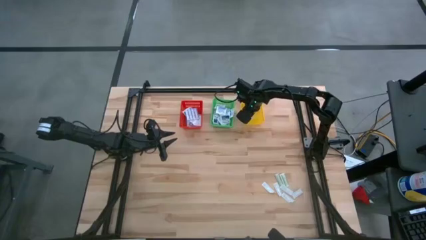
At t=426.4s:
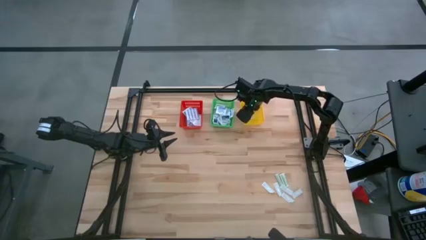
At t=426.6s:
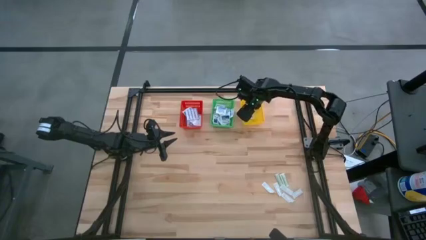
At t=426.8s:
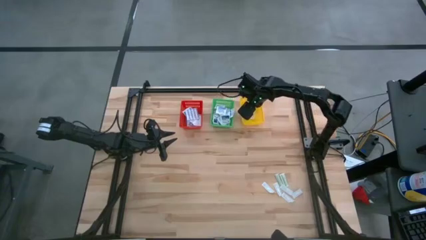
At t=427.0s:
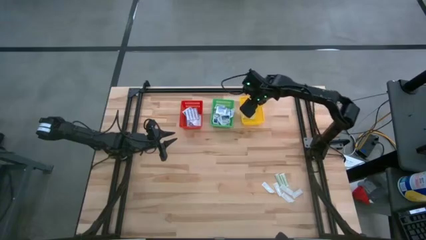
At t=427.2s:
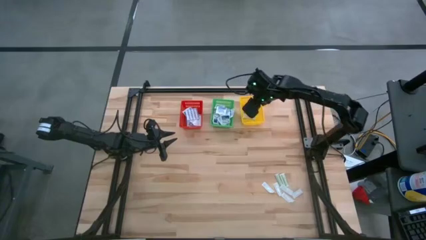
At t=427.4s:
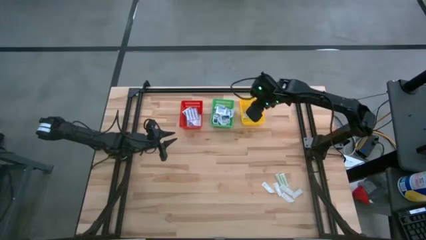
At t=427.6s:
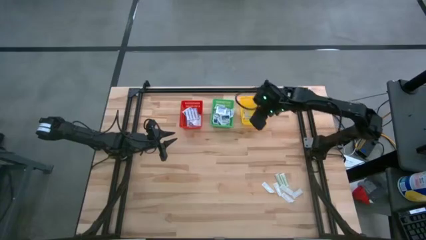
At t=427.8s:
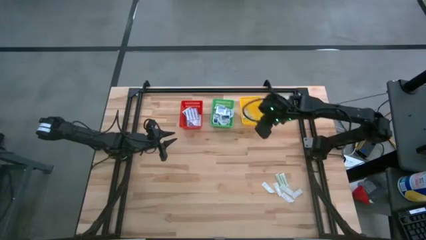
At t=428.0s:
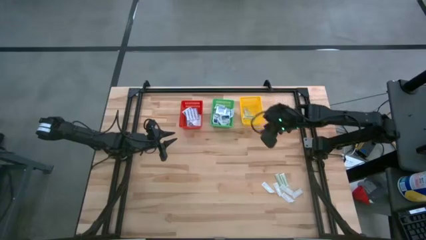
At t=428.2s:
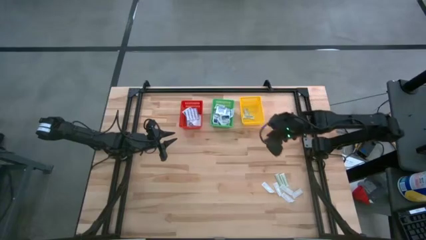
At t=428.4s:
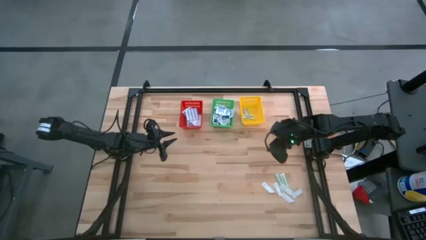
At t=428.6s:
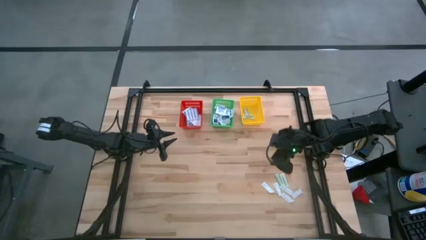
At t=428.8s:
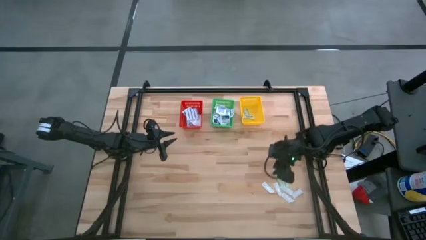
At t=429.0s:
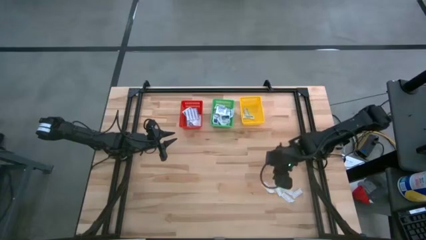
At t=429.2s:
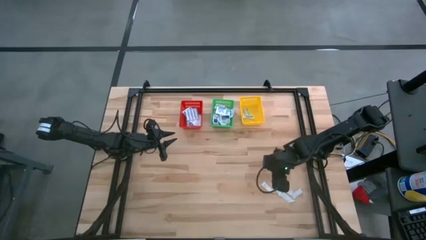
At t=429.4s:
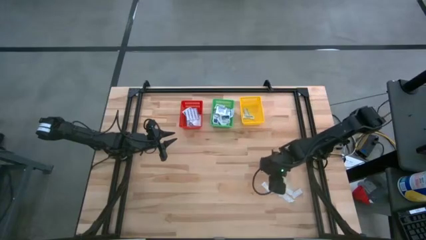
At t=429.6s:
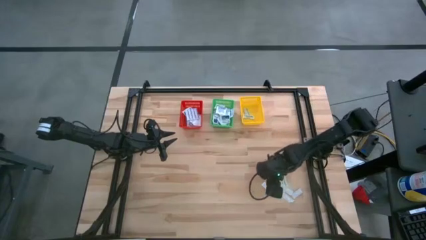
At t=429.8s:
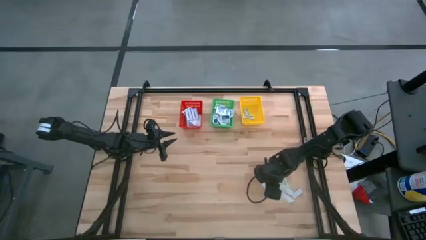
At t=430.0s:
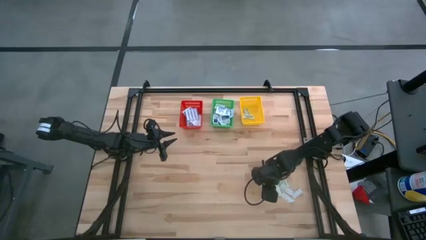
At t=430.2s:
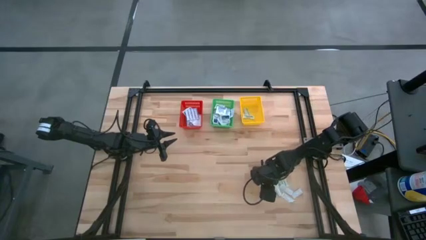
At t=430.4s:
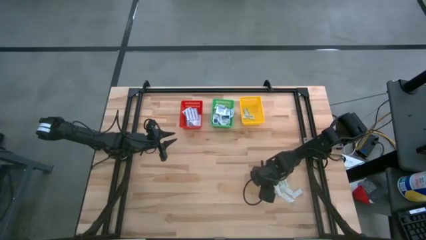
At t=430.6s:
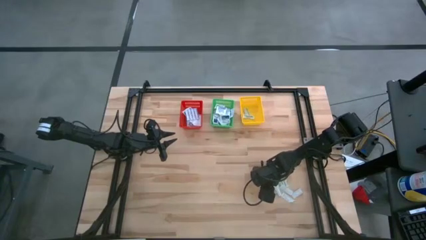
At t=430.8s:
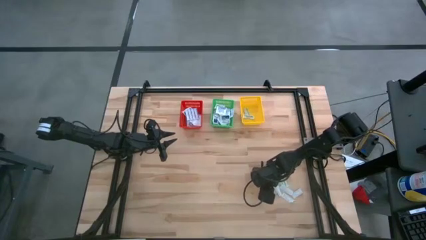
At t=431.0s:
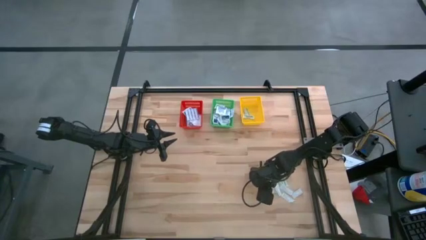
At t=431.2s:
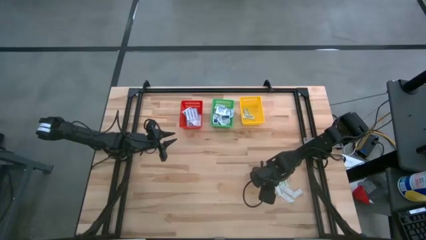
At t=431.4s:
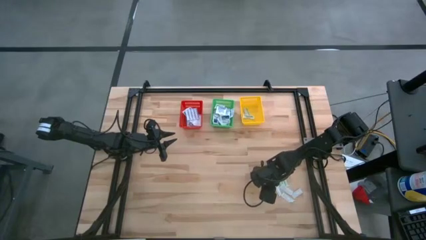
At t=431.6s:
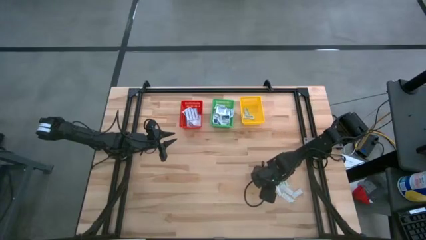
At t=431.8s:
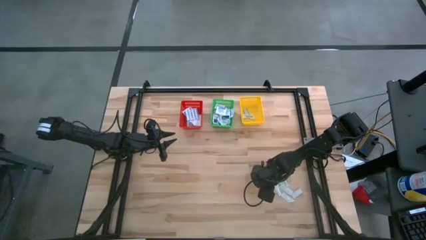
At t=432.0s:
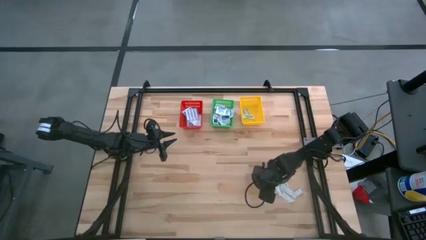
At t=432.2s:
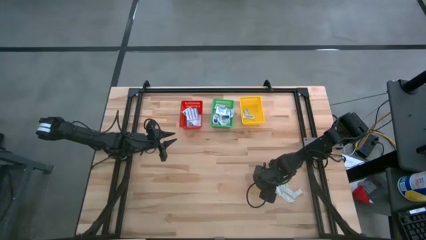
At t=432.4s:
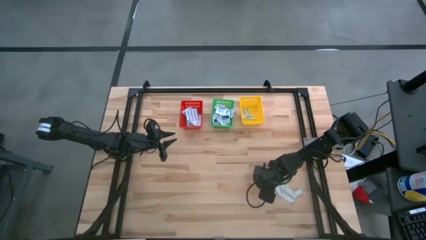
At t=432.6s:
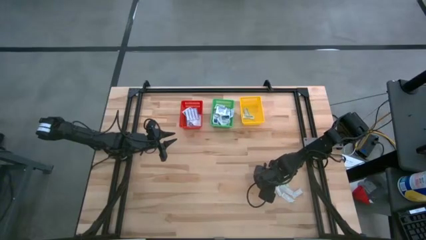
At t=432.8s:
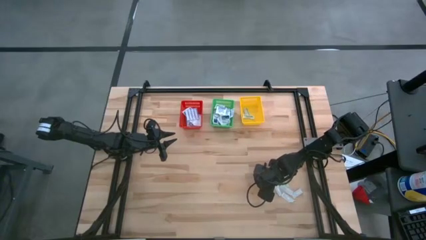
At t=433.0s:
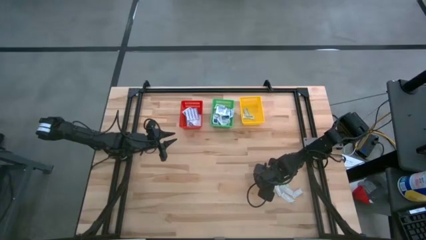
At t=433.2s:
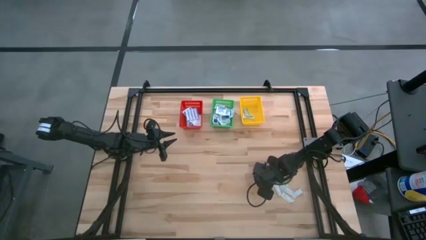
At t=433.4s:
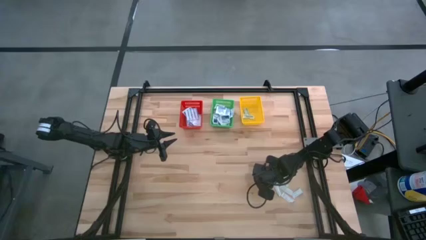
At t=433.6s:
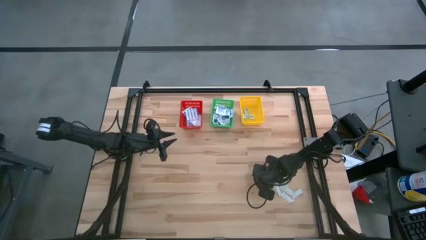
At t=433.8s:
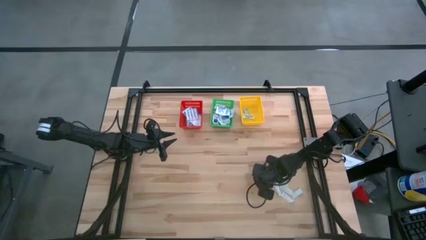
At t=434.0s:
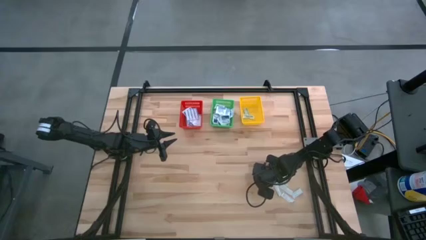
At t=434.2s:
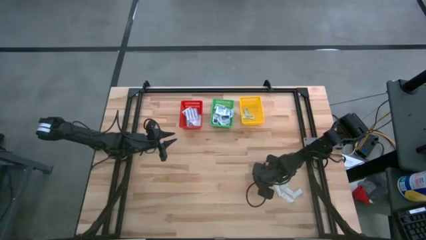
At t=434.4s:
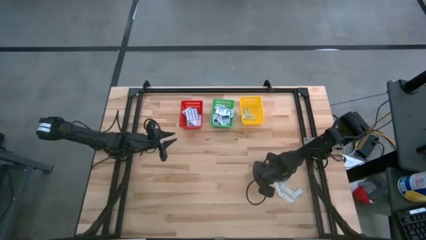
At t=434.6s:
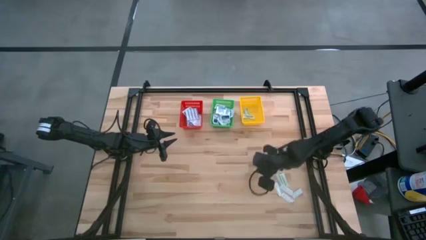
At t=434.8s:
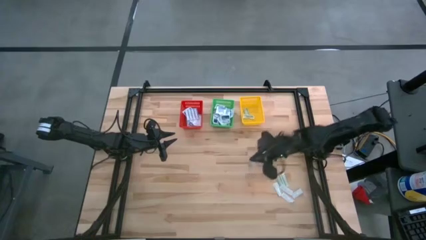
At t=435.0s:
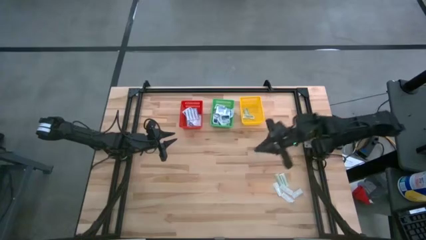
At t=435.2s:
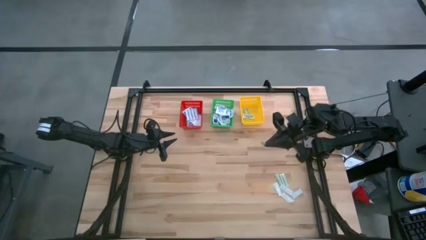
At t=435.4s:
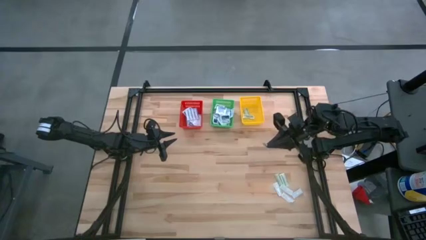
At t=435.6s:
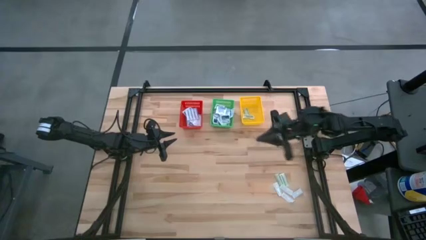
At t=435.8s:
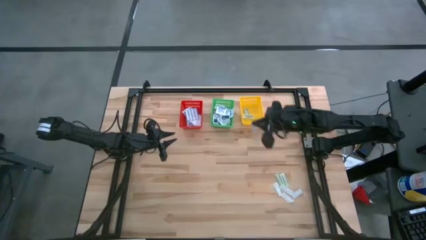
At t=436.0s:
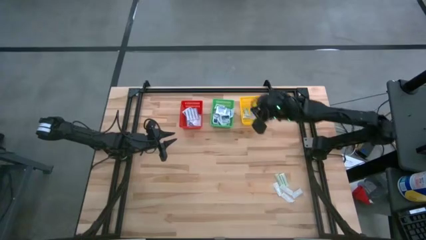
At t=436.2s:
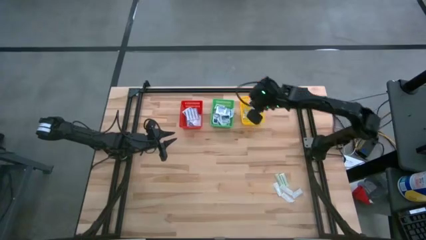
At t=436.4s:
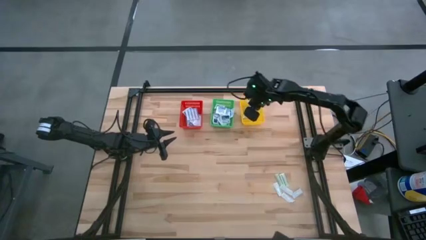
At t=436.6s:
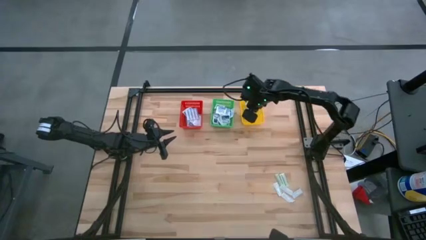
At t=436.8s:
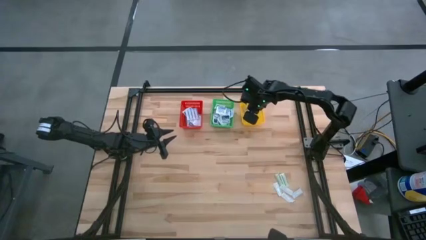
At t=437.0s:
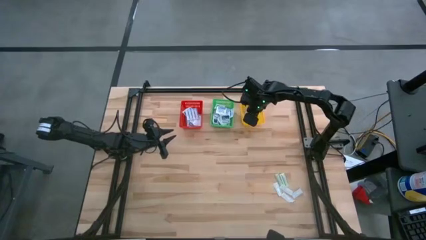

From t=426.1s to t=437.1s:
Task: Pick & Place First Aid Supplies
Put the green bandage into the yellow basket

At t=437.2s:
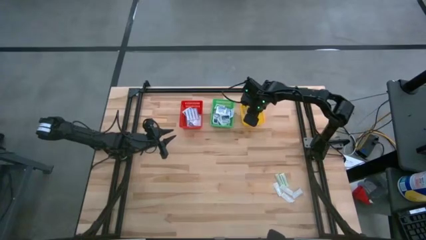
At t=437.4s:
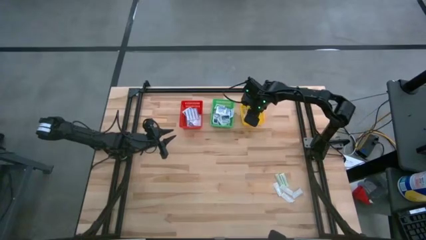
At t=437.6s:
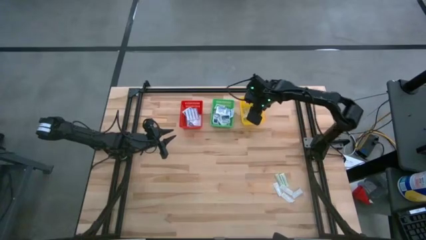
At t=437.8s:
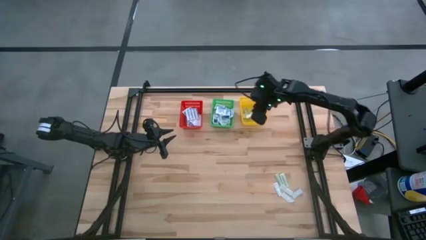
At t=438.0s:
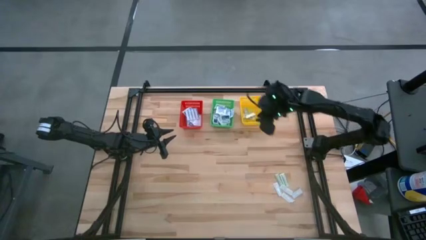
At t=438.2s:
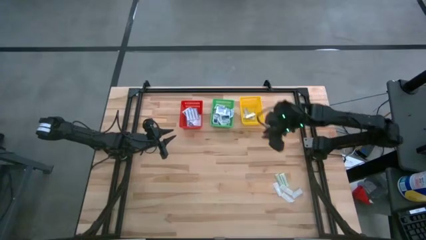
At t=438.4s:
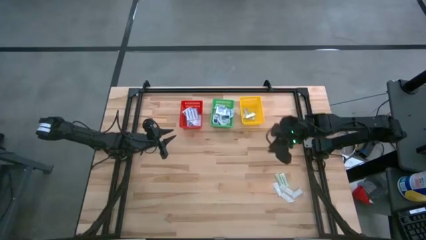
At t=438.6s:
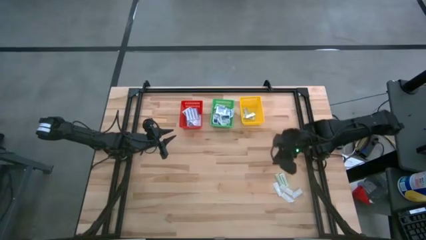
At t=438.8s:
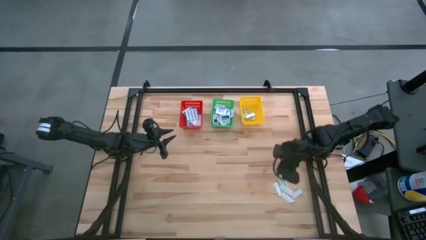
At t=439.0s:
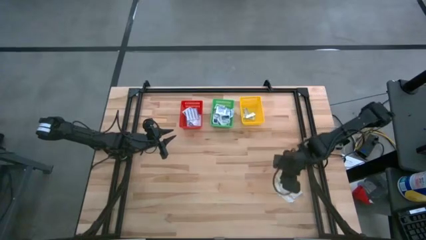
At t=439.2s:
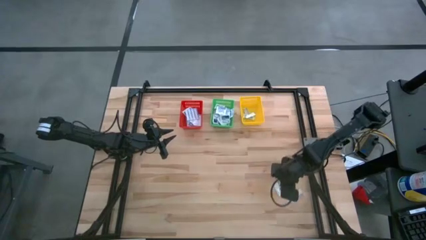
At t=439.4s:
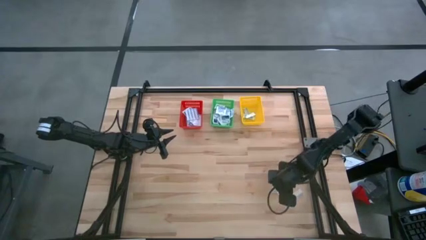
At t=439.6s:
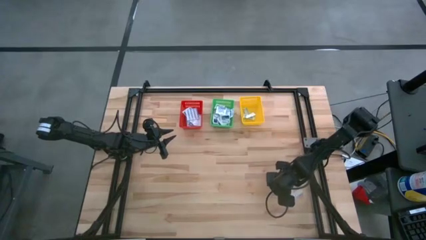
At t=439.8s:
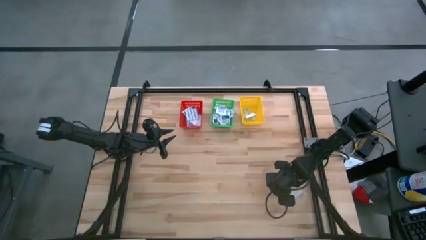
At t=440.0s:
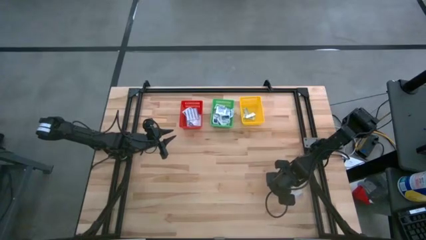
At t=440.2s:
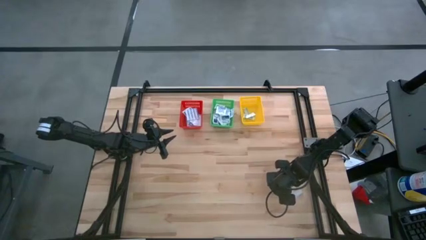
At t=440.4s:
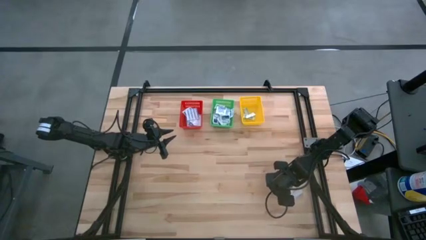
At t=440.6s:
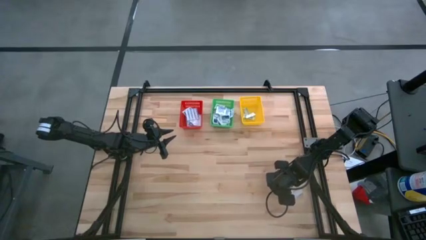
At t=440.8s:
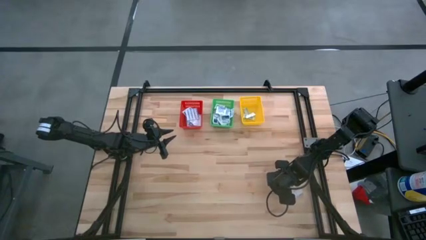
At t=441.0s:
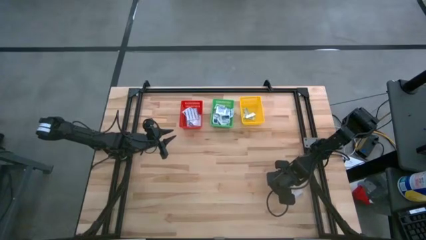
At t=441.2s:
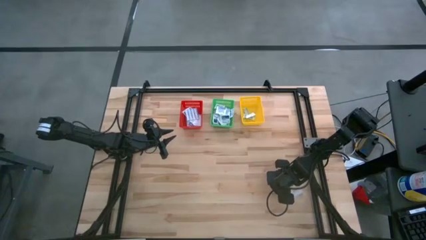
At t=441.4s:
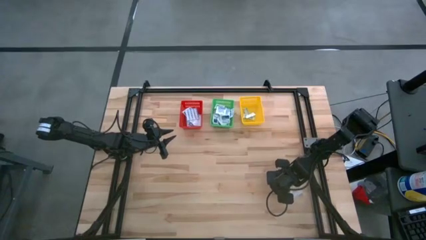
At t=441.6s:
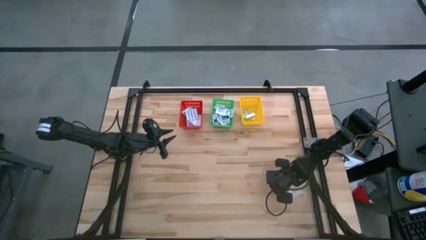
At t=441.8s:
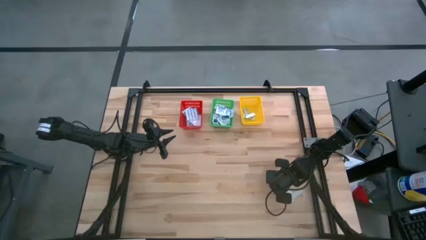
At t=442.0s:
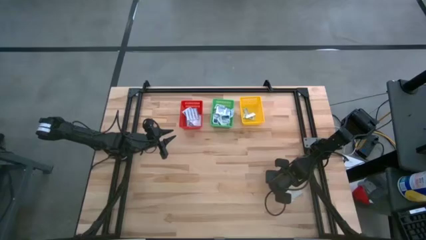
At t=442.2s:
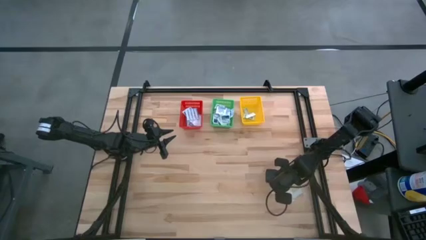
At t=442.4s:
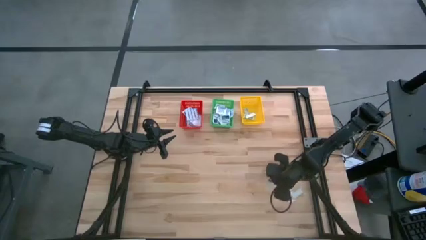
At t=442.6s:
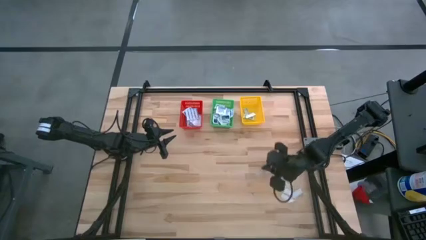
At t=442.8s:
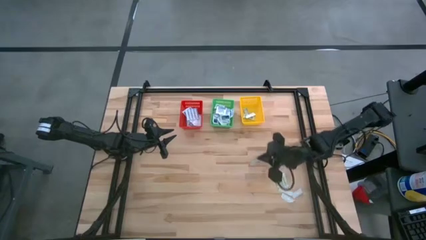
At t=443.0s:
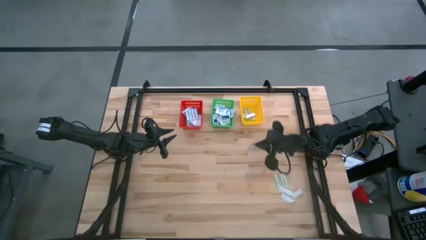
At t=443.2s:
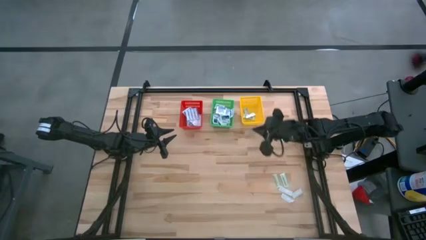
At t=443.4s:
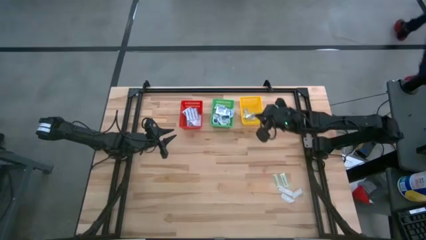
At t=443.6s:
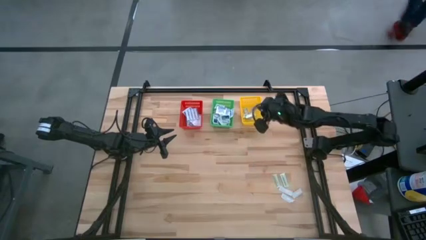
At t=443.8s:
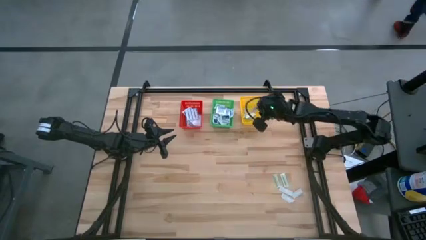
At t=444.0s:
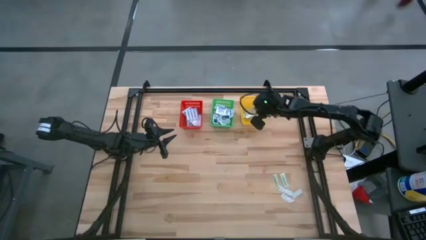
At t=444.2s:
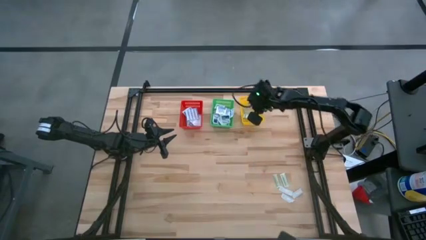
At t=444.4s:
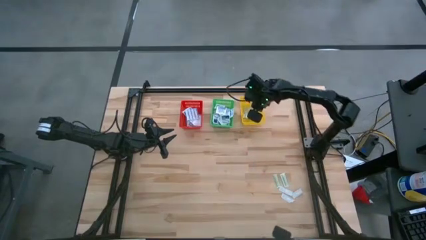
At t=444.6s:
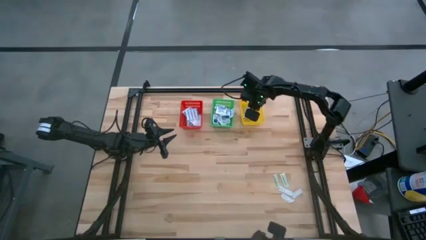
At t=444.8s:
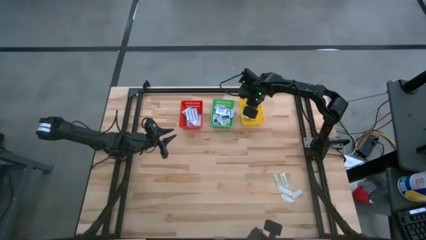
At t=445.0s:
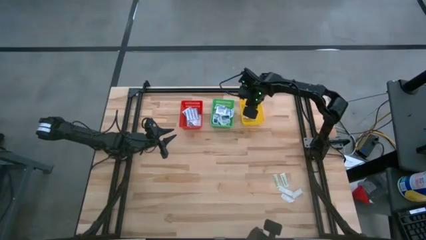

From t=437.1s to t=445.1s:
Put the green bandage into the yellow basket
